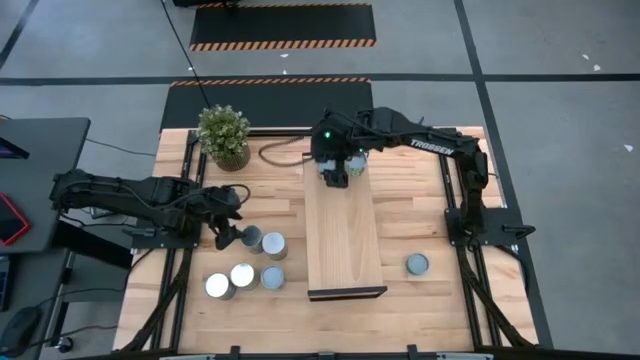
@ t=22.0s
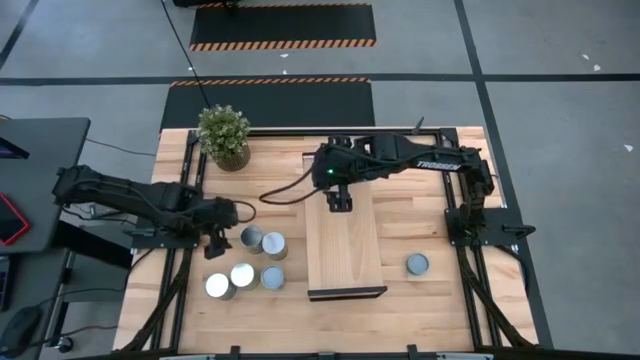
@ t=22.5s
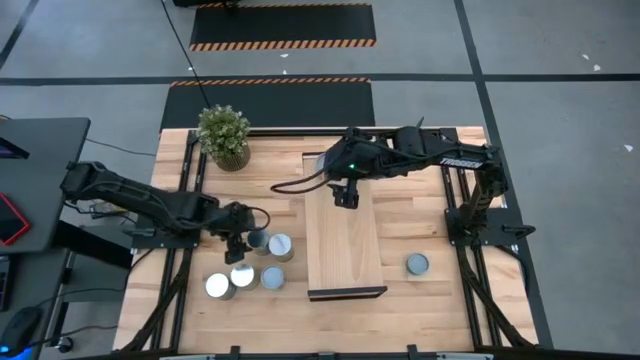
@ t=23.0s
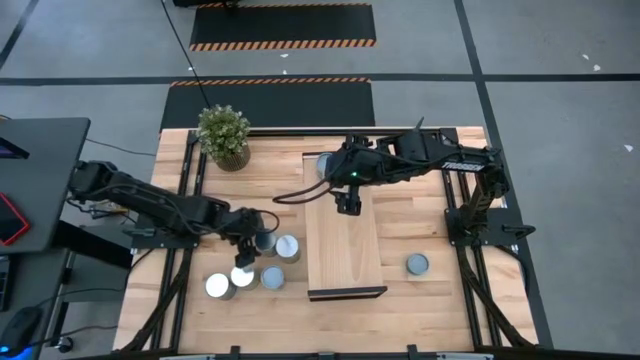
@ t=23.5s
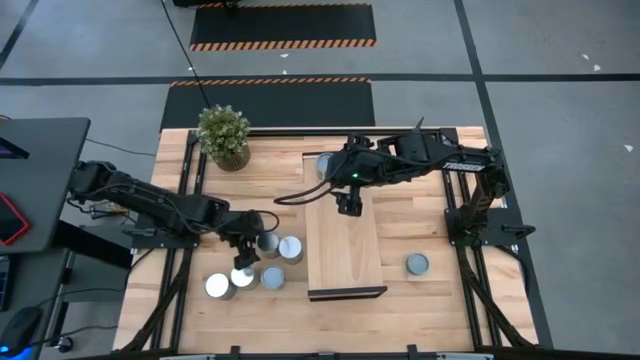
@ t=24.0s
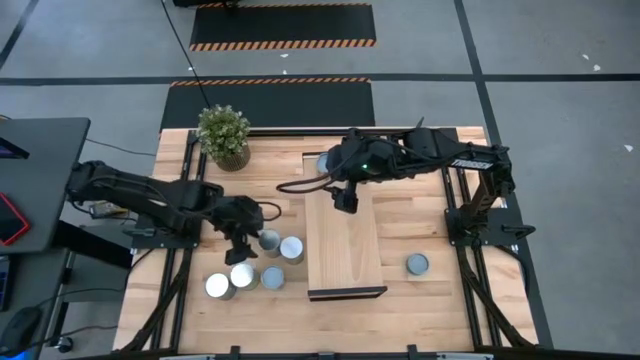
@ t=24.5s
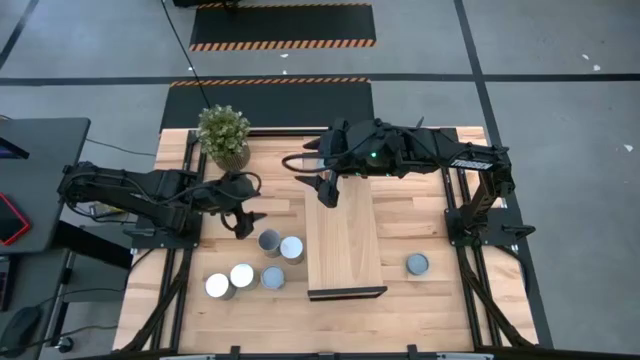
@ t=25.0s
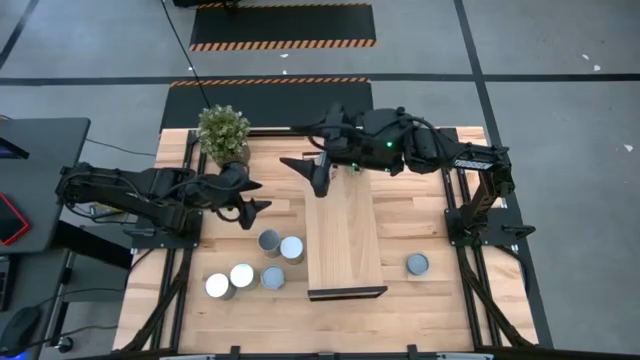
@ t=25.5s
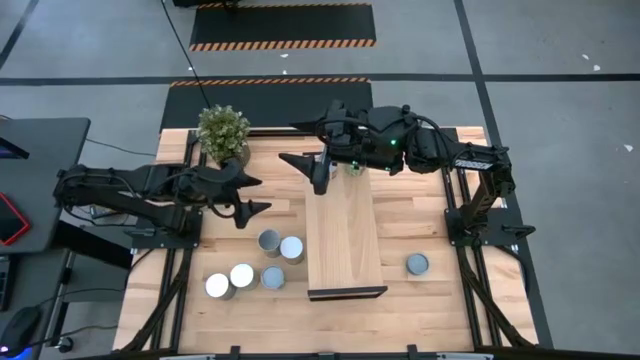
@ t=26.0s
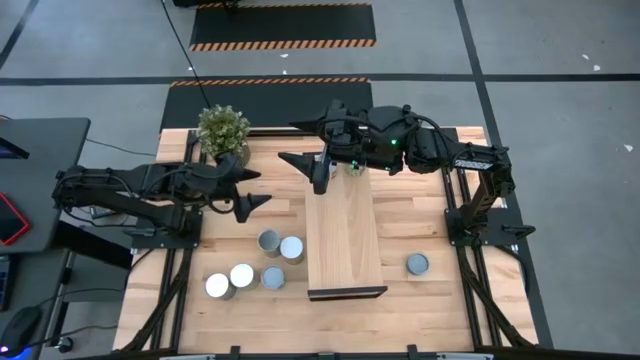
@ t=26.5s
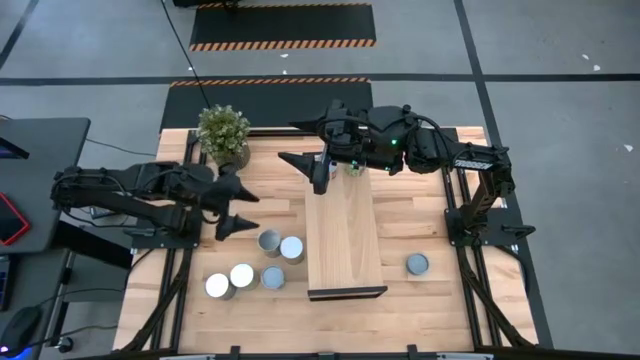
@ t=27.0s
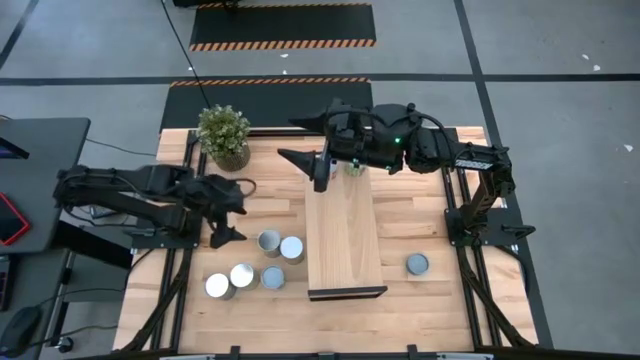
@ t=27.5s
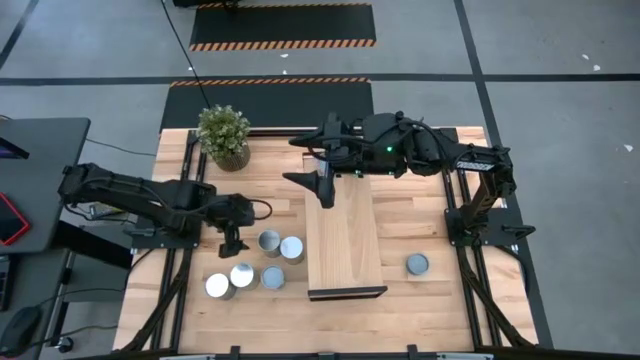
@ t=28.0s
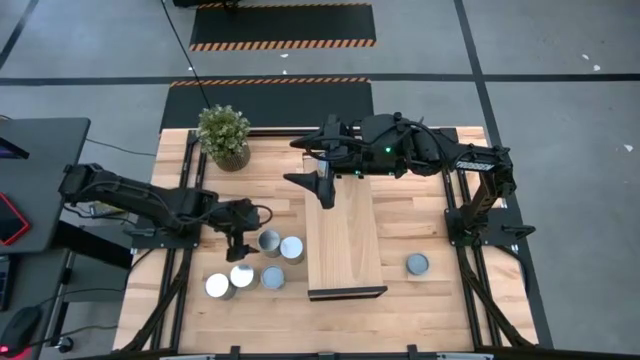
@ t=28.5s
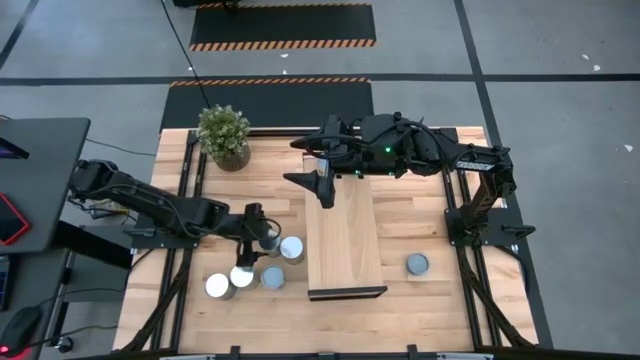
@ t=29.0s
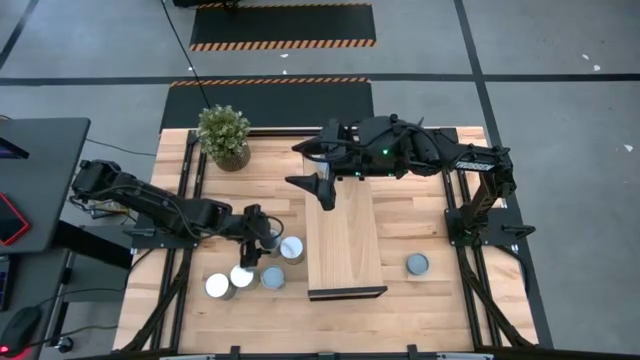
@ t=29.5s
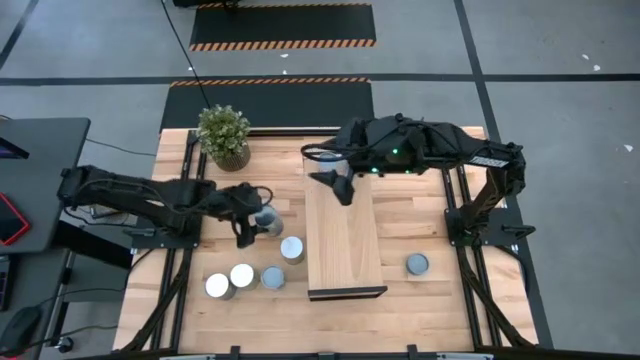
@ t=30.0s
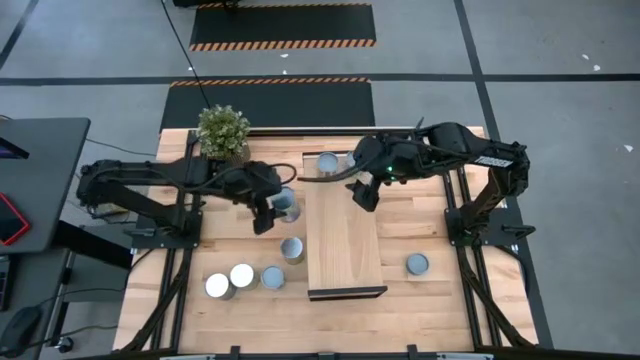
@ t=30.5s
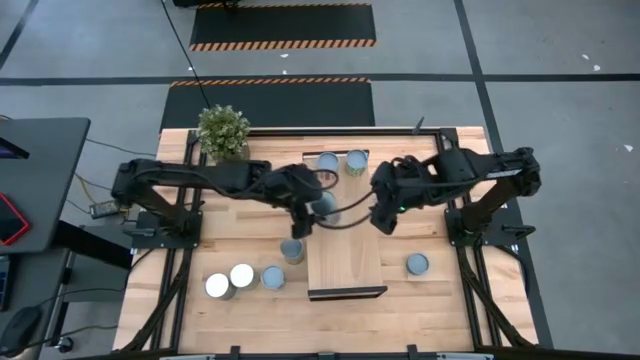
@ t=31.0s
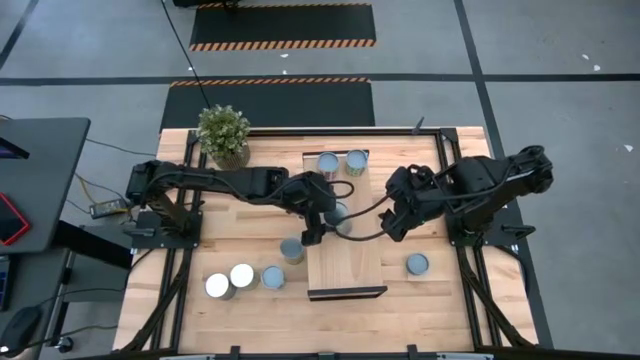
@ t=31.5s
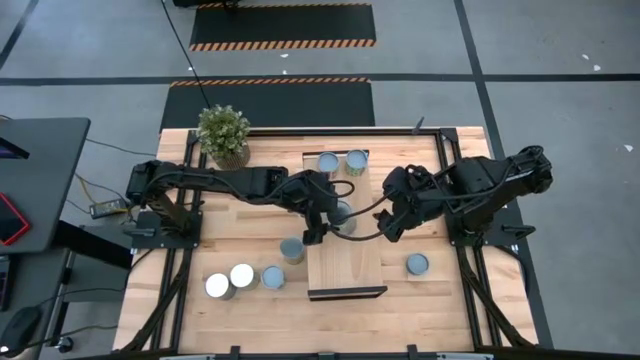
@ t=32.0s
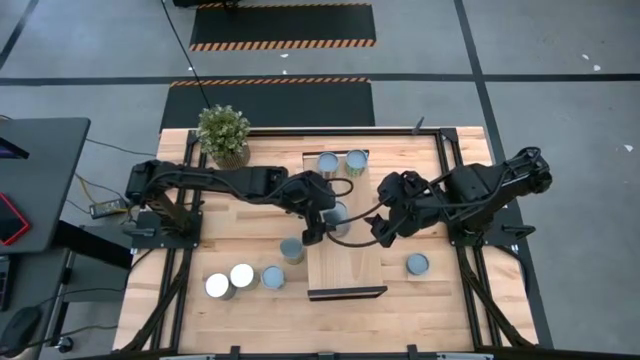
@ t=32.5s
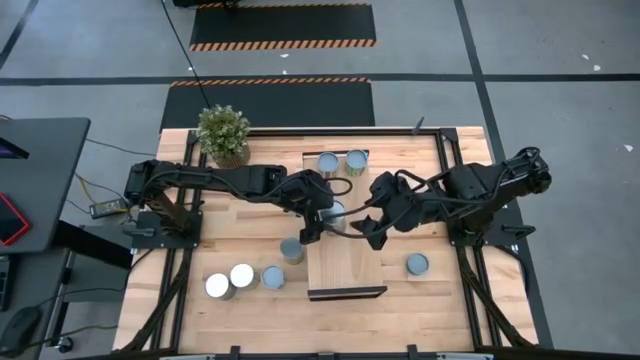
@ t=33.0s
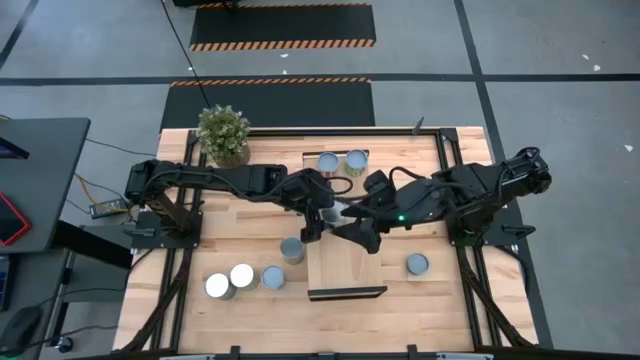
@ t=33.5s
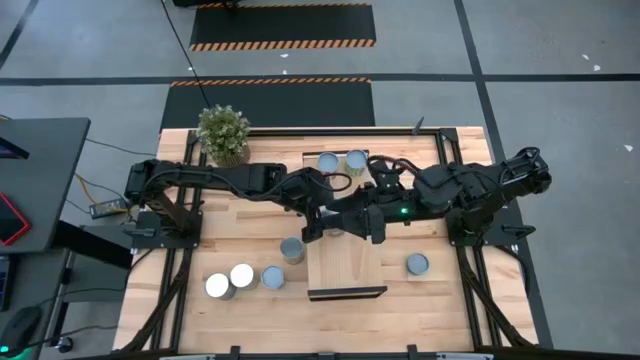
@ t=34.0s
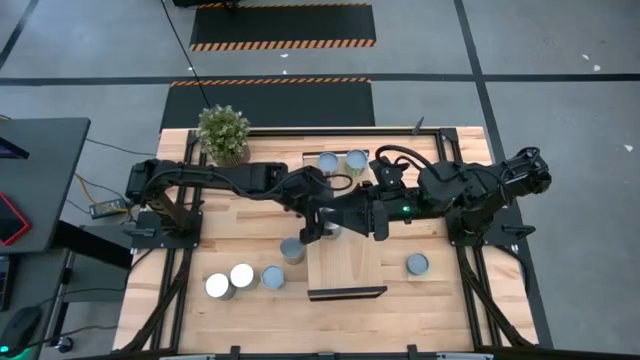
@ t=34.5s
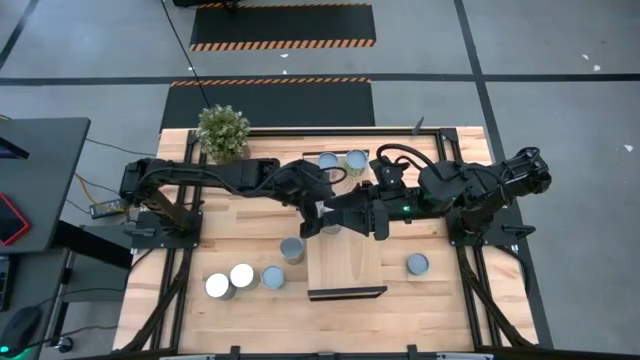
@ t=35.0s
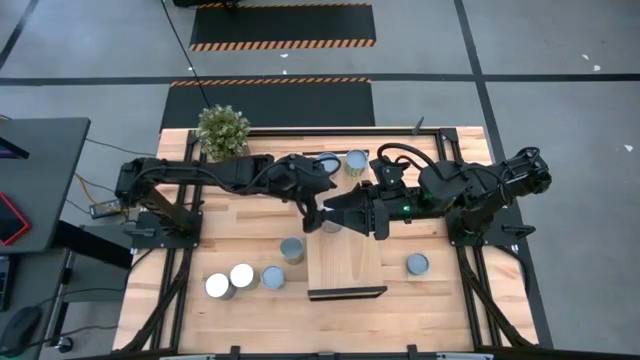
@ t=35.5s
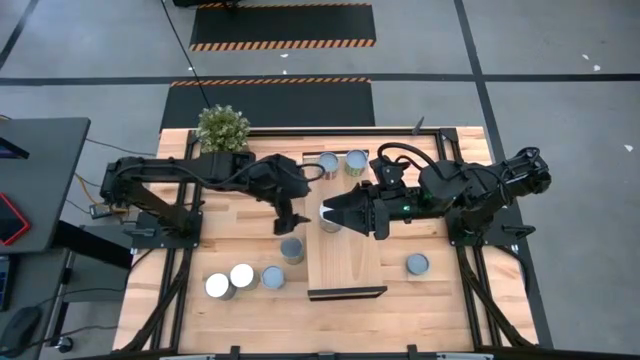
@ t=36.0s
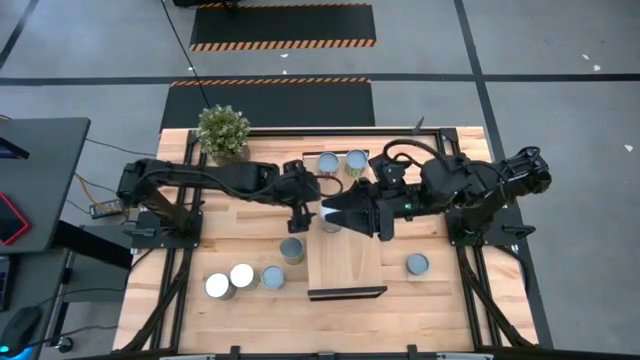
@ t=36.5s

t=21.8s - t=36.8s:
Task: Pick and place cans onto a shelf
Put the canned peaches on the shelf

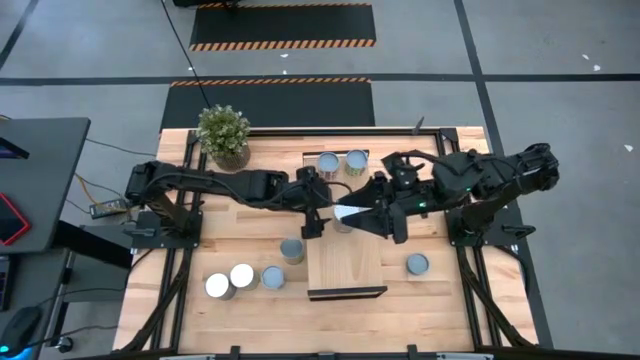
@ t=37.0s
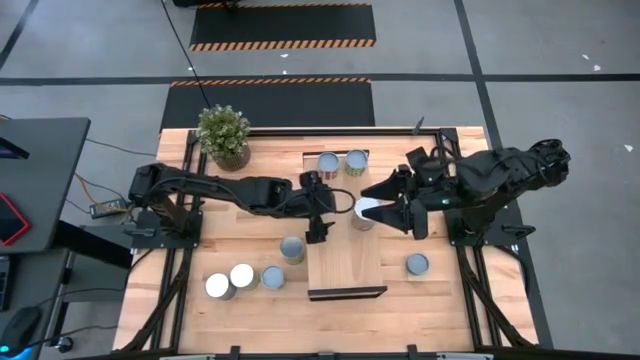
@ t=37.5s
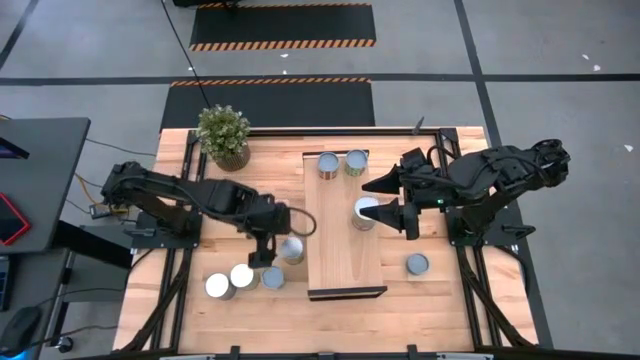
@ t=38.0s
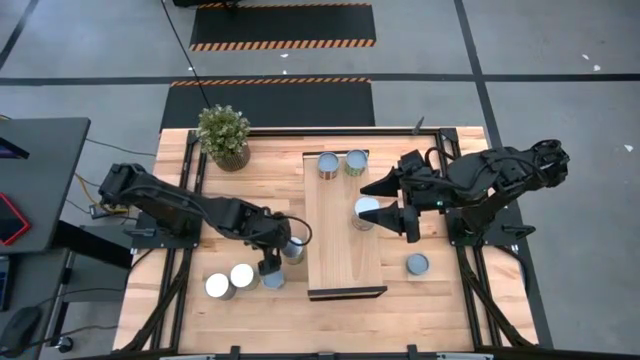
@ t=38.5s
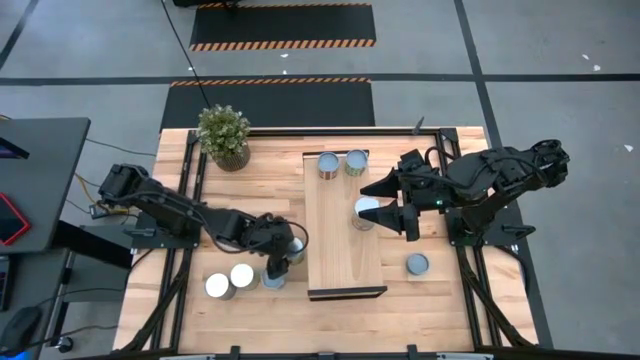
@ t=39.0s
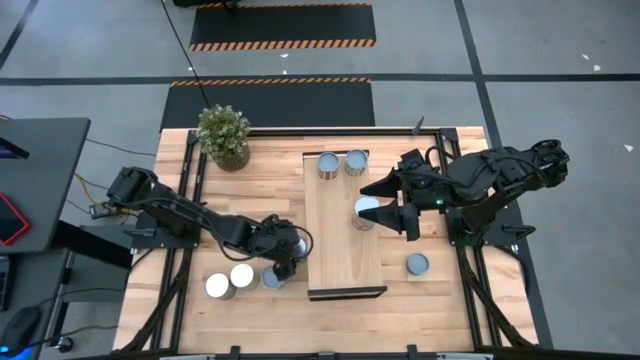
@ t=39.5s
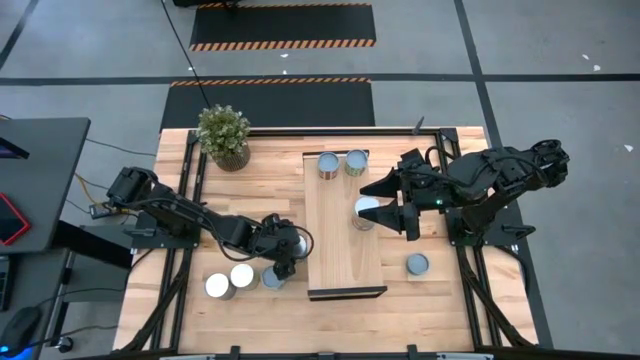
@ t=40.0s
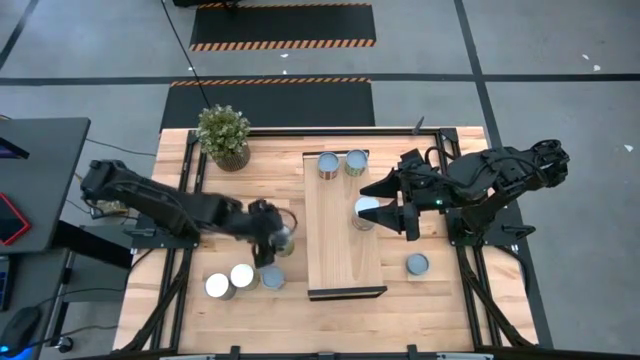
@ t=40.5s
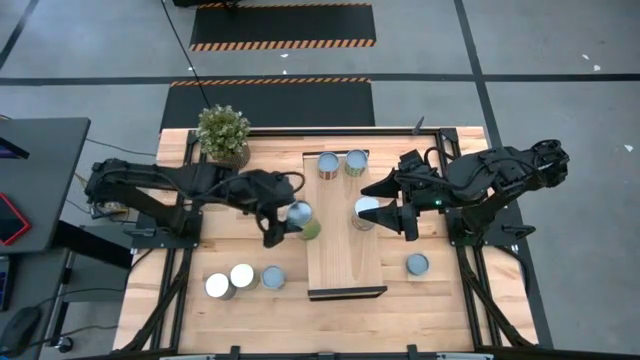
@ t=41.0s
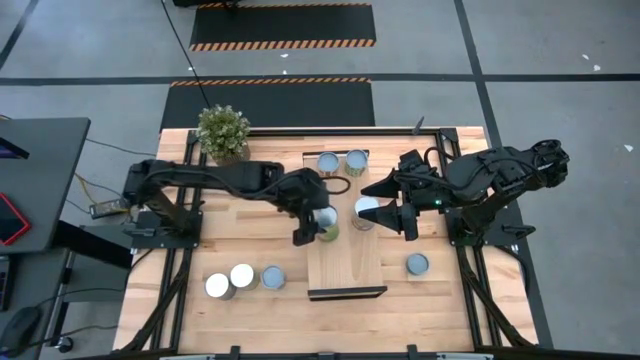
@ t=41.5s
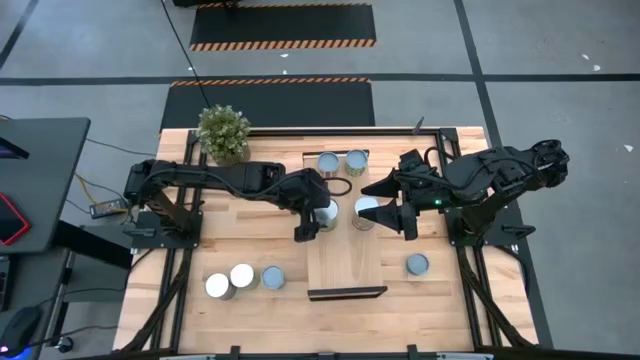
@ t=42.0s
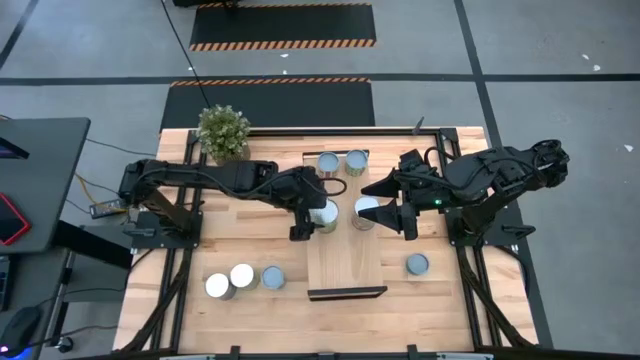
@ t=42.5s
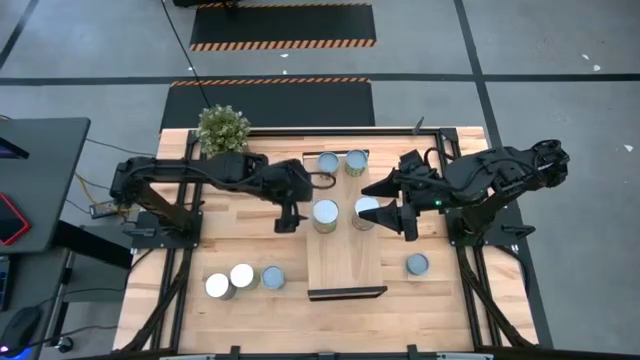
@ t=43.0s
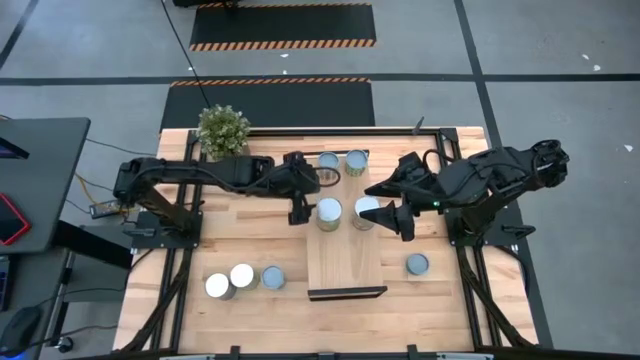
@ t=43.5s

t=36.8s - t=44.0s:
Put the canned oranges on the shelf
